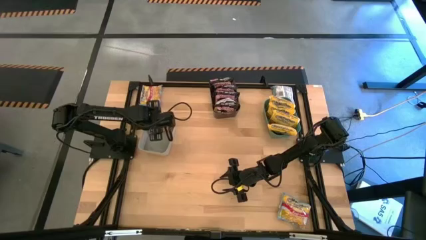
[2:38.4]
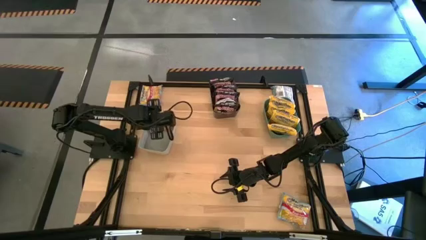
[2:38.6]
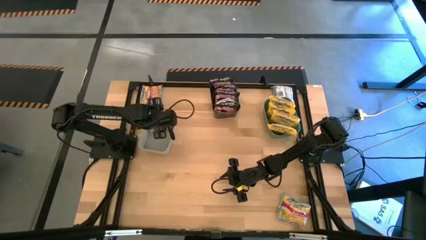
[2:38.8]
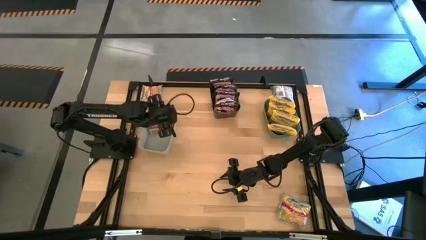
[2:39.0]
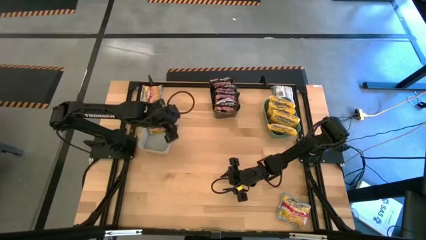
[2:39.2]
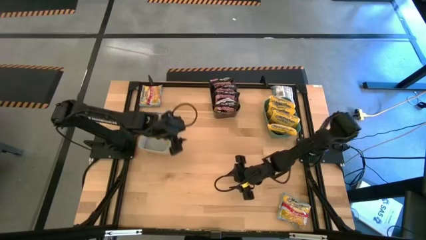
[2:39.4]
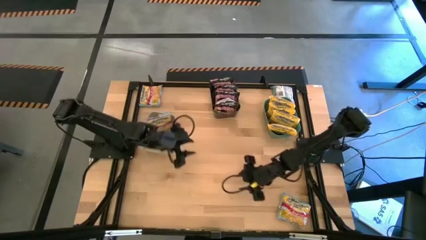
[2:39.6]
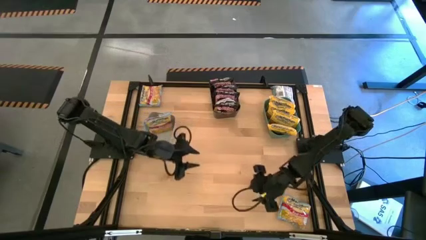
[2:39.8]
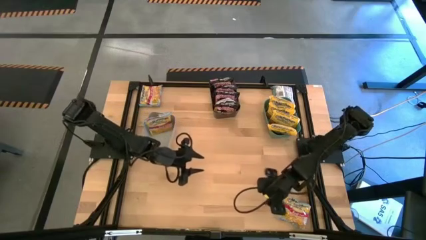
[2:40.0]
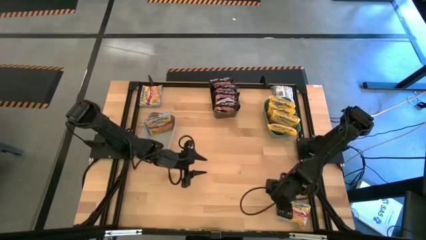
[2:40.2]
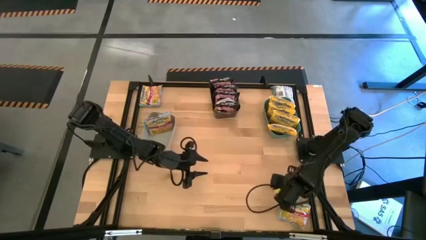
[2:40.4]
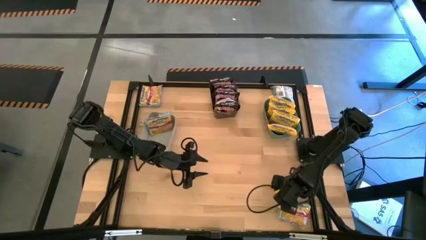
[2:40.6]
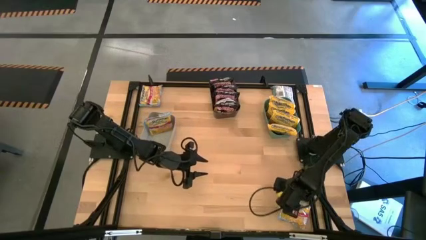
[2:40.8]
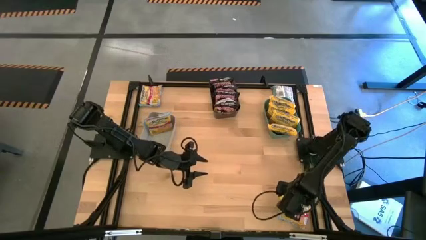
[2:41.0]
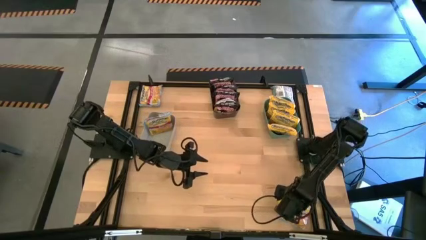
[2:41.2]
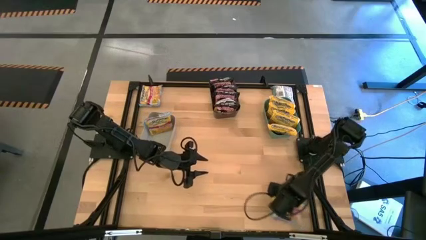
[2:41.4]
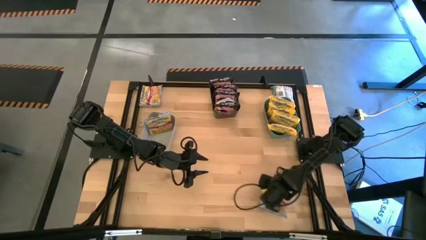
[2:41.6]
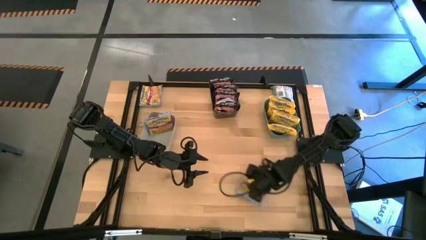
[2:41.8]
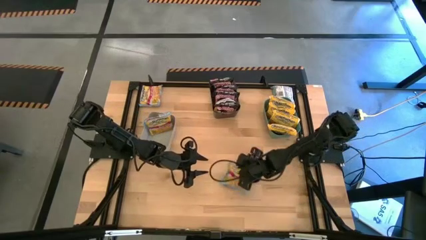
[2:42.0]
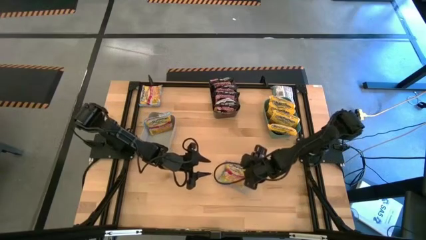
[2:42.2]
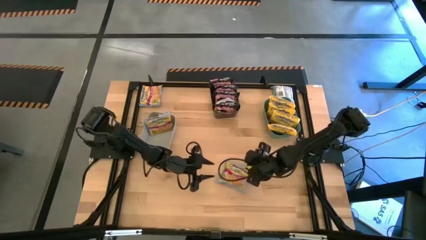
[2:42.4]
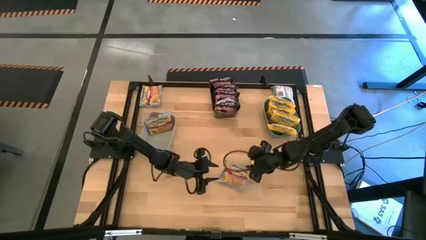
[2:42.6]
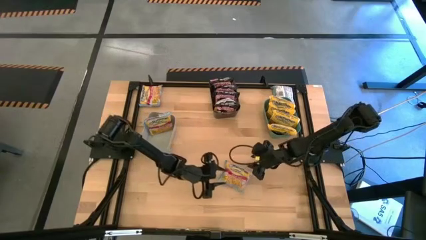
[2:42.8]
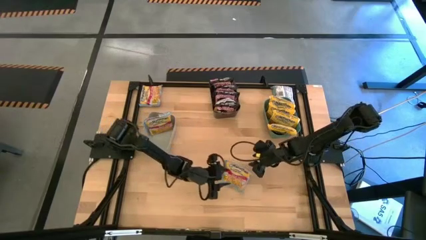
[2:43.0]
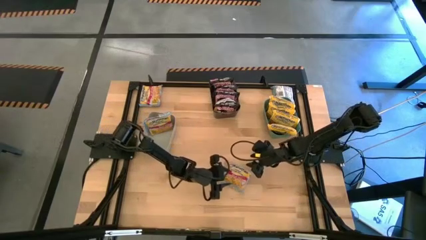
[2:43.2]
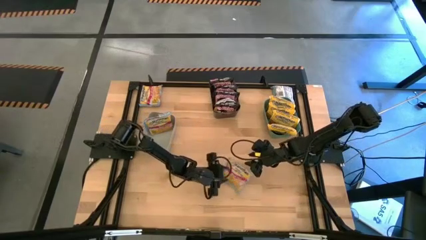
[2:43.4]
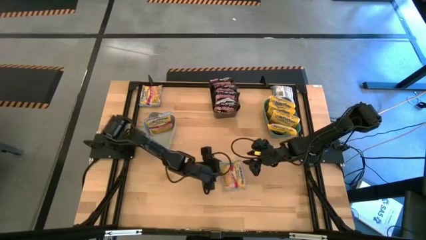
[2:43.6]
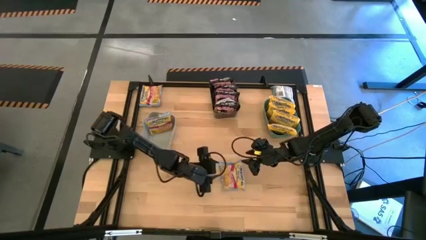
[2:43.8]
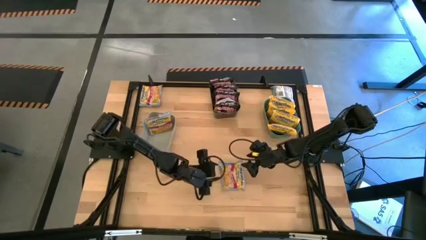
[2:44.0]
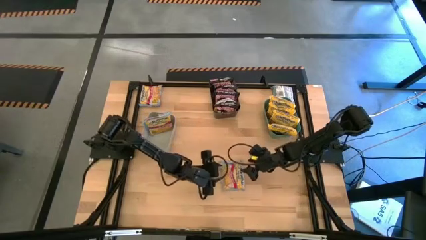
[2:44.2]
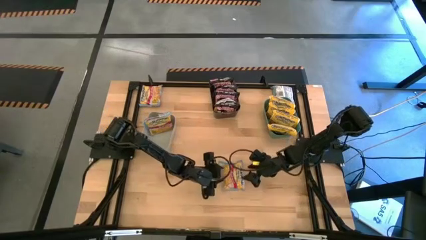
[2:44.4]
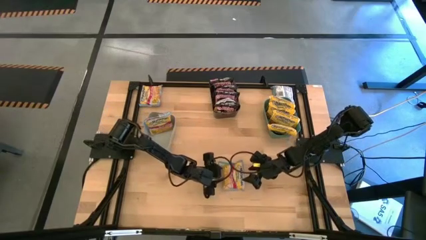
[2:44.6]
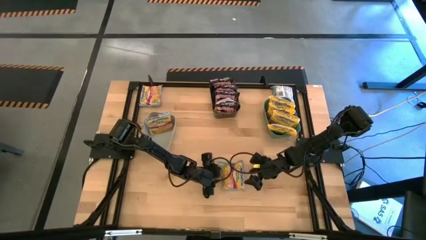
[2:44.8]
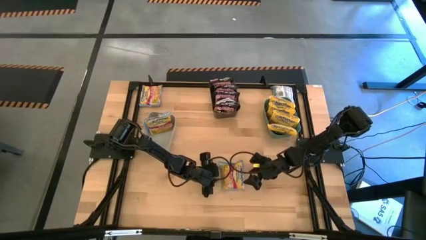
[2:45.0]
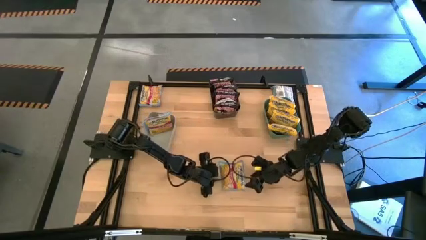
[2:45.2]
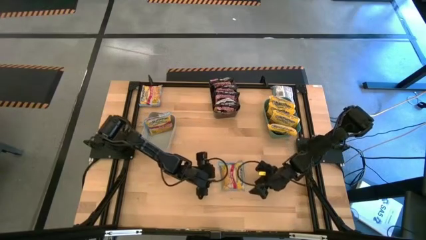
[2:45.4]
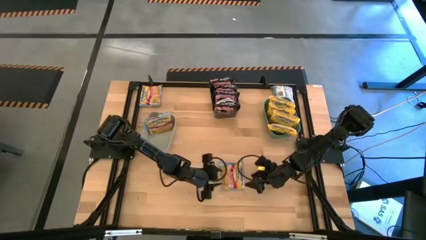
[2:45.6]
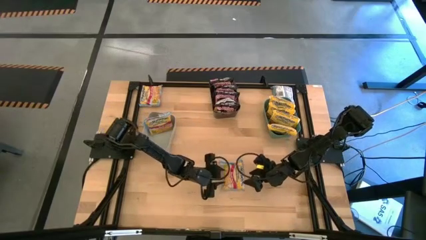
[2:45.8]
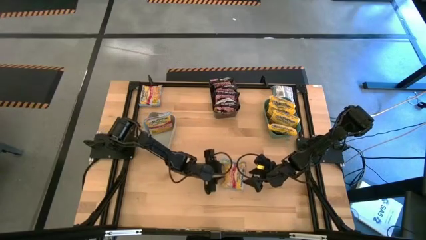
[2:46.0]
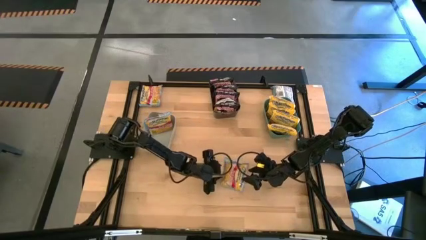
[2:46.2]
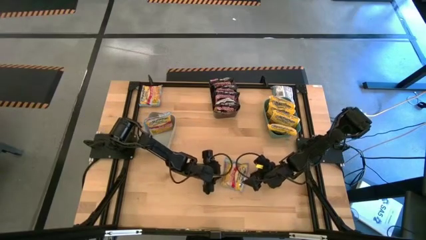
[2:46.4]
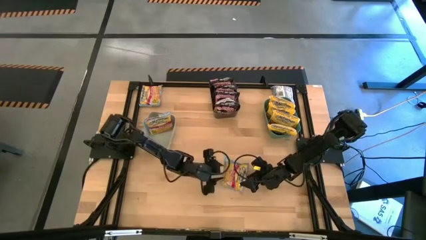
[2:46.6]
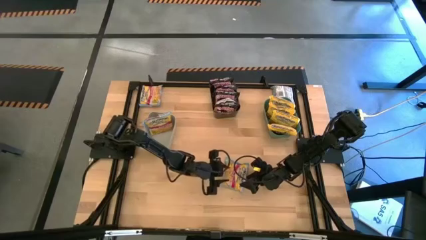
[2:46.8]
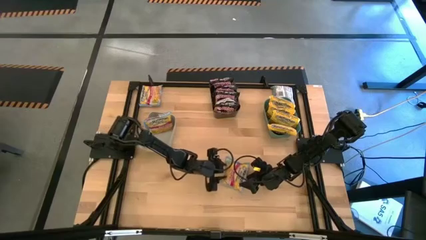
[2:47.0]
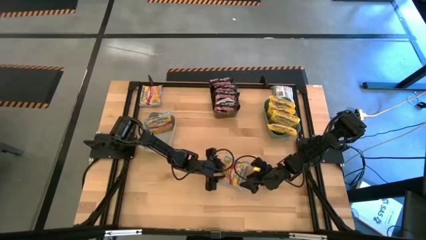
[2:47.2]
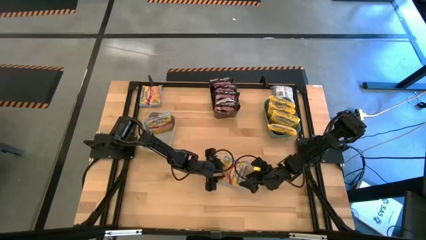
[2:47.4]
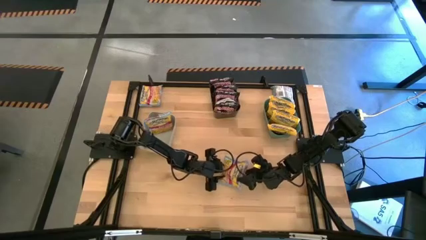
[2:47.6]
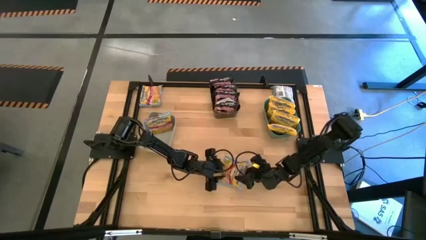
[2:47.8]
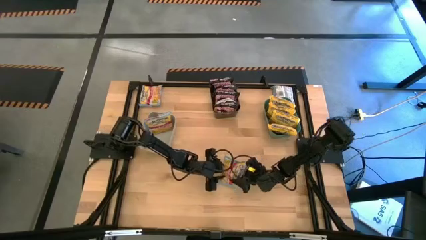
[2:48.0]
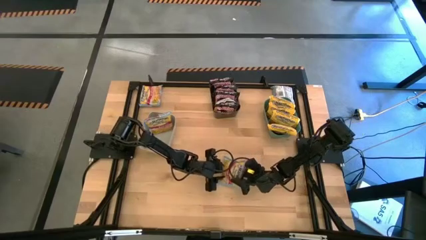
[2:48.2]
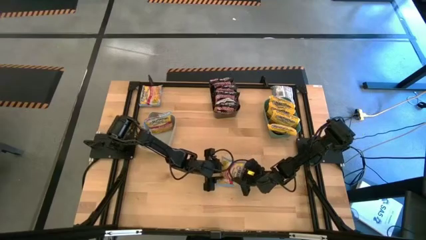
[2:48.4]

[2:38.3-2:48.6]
Task: Sort Maruchan noodles
Put the blue noodle pack into the gray bin
